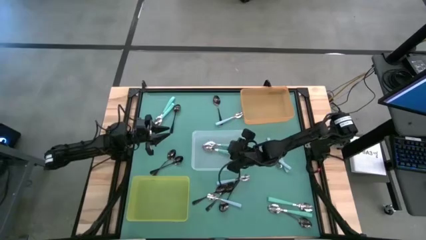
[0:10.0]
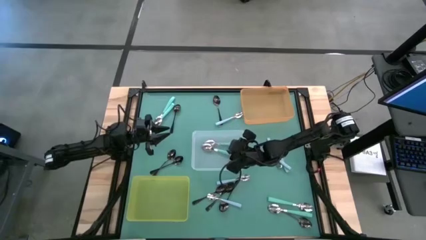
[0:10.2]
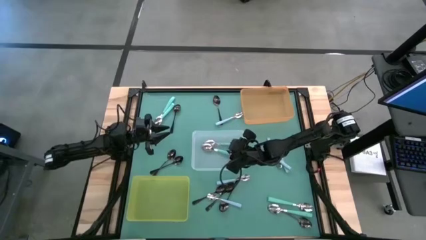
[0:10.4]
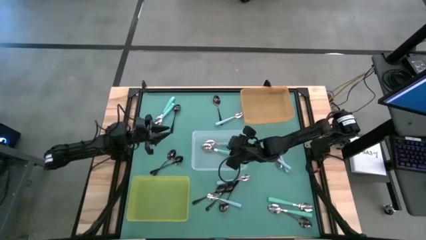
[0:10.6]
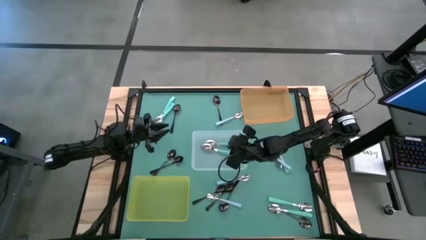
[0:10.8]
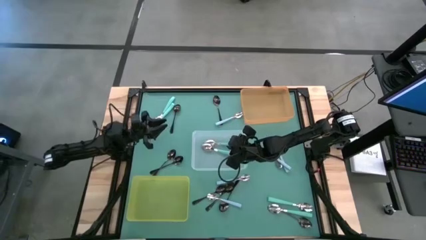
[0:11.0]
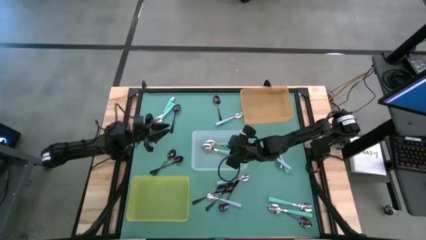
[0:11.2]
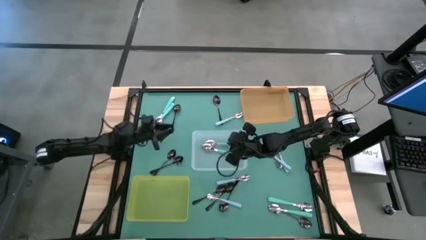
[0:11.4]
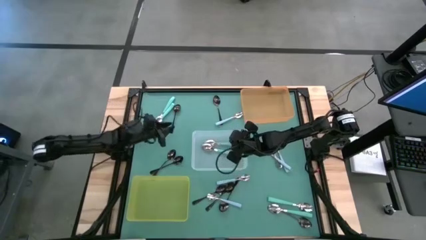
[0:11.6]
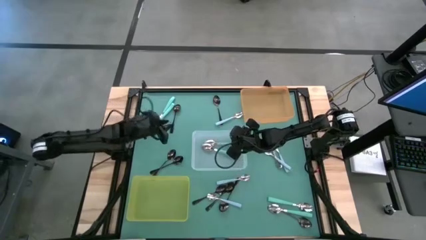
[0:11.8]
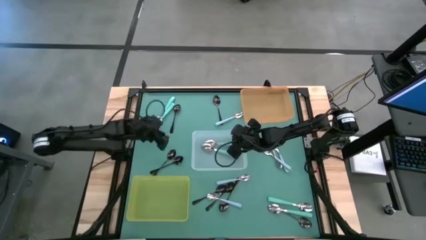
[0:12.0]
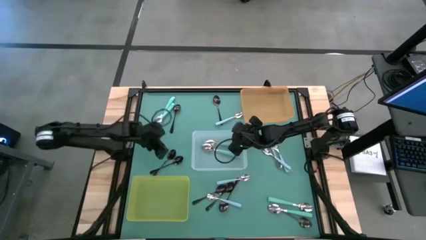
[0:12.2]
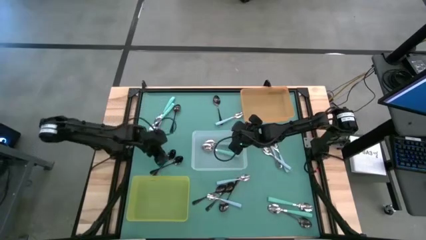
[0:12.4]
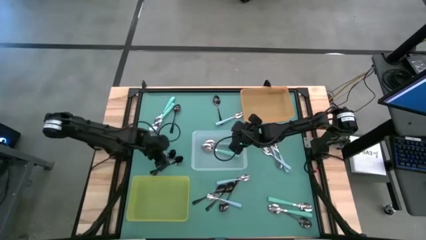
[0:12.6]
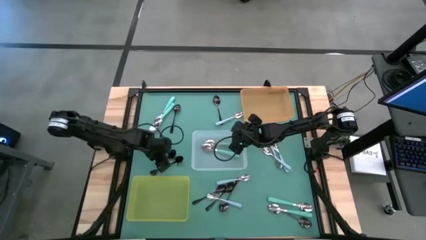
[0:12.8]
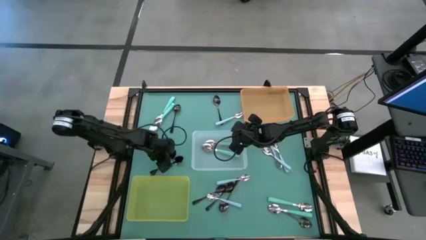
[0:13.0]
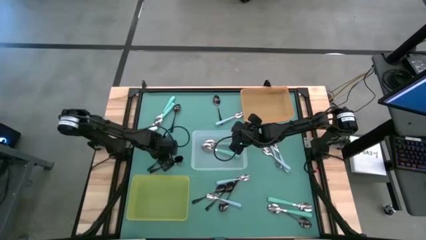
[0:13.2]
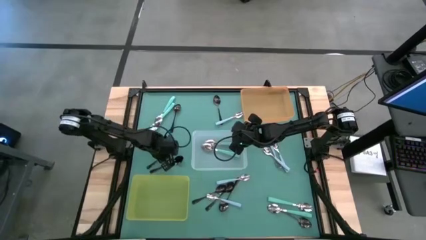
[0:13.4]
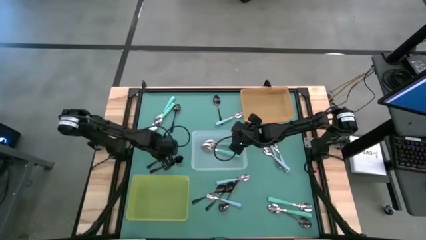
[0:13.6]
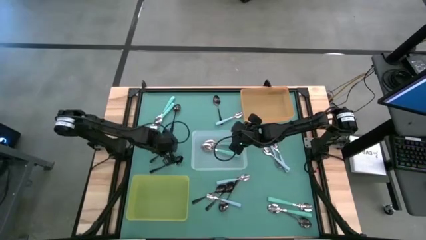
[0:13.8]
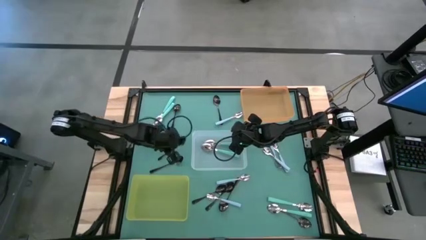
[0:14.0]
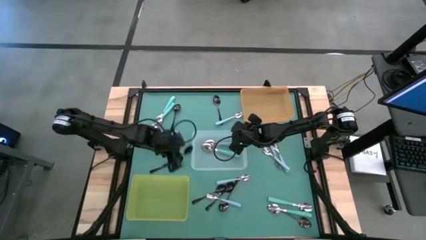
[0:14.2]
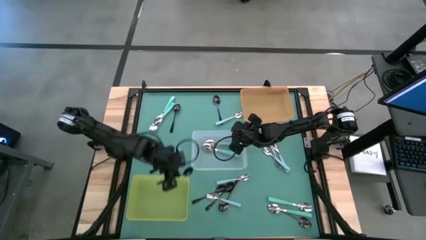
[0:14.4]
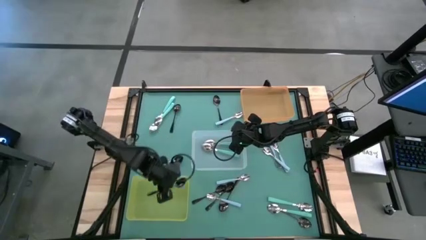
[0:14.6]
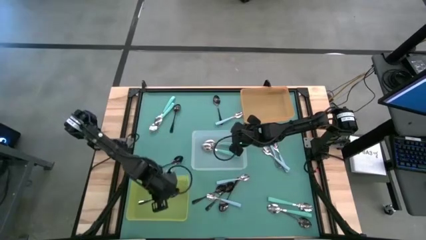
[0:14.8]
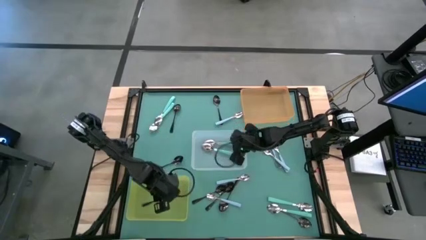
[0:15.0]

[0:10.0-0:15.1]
Task: Sort silverware by color (type)
Put the black spoon into the yellow bin

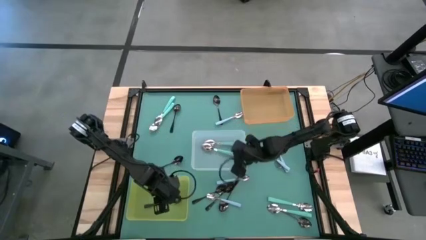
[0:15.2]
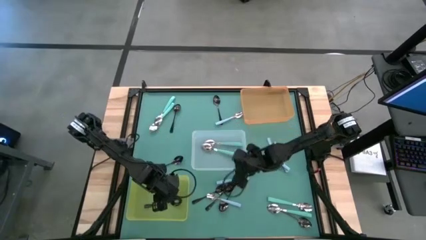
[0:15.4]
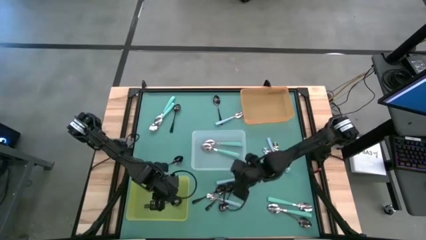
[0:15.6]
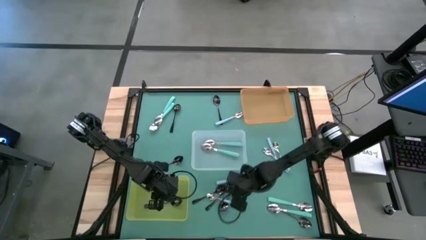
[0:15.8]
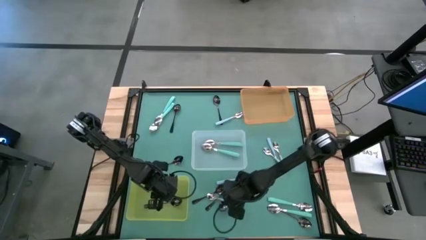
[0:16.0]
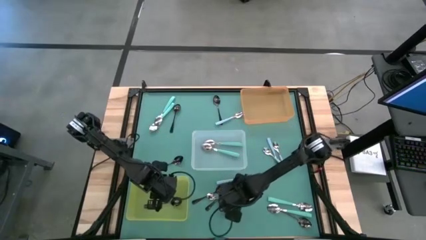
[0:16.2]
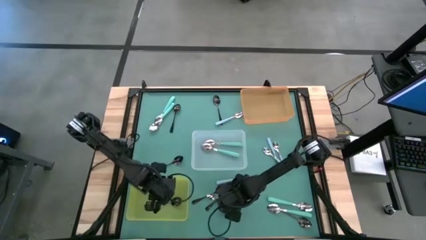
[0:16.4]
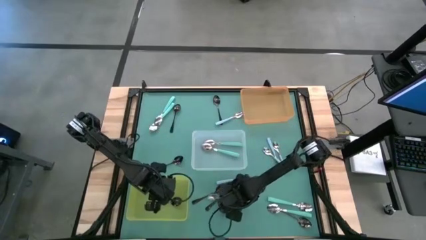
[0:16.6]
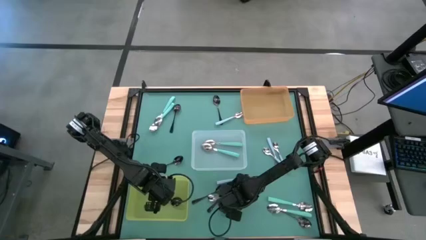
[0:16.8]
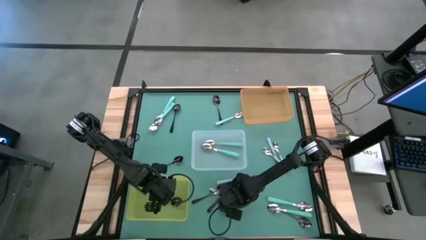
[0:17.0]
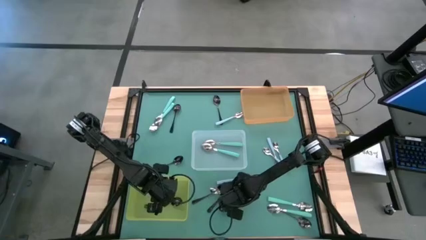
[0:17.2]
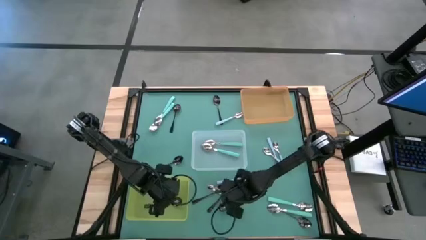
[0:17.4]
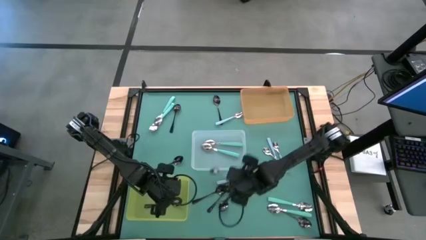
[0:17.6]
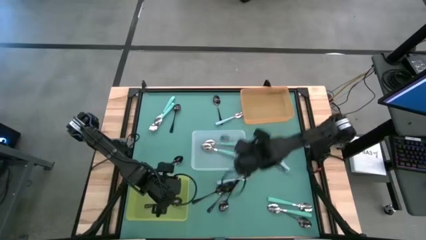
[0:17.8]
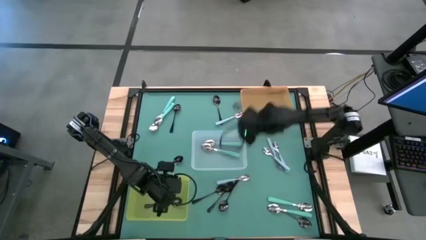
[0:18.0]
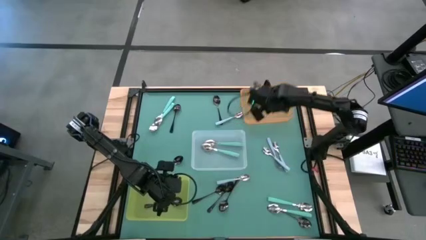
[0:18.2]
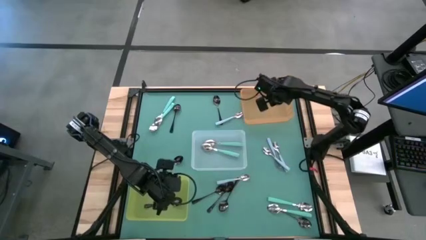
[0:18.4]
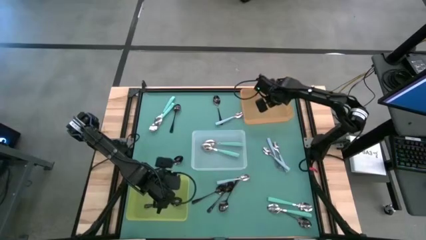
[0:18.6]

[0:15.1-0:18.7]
Put the purple spoon into the orange bin

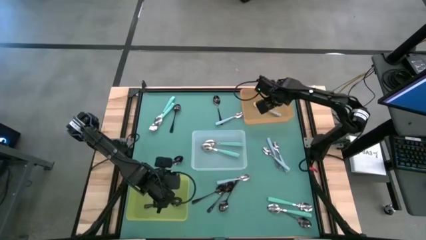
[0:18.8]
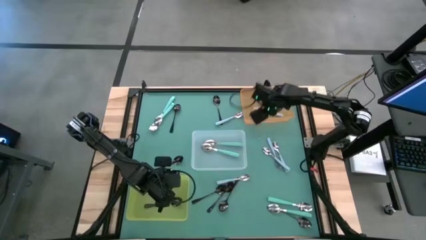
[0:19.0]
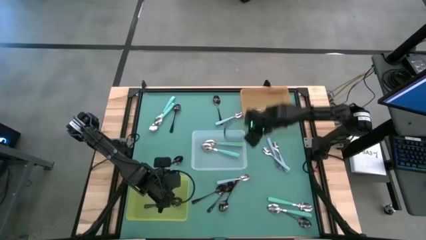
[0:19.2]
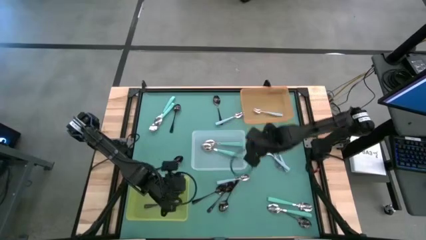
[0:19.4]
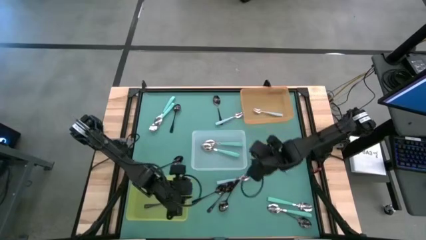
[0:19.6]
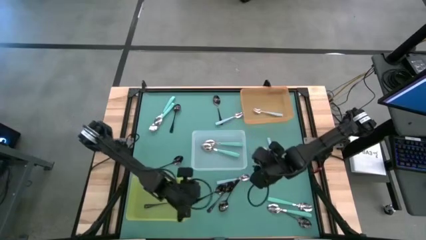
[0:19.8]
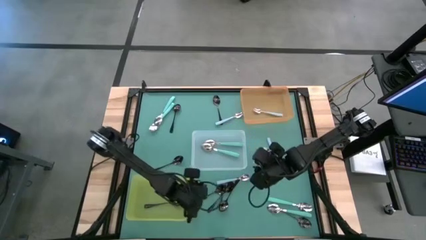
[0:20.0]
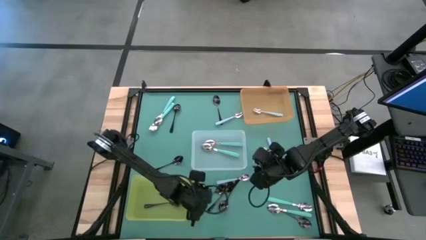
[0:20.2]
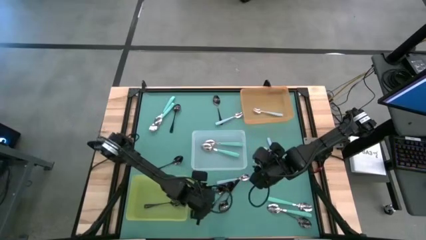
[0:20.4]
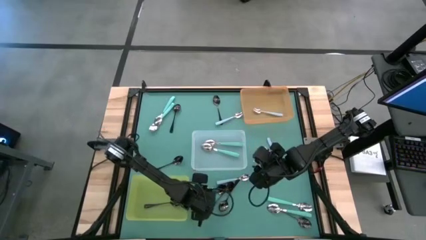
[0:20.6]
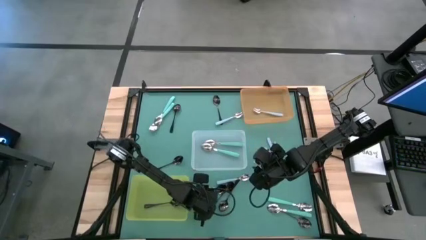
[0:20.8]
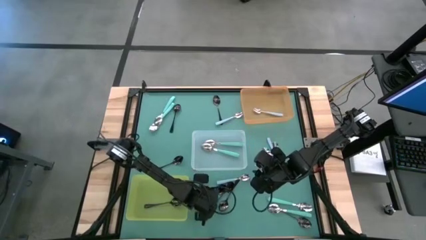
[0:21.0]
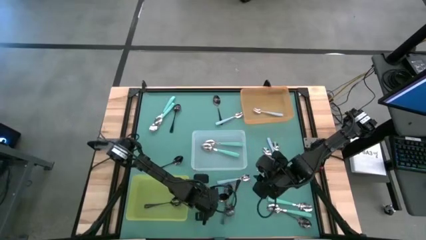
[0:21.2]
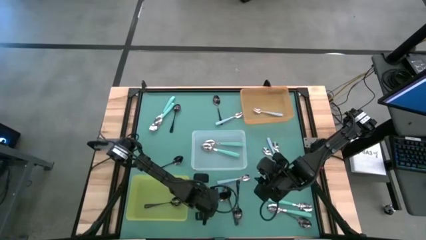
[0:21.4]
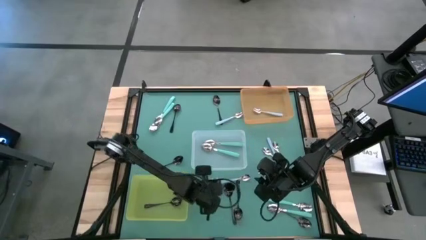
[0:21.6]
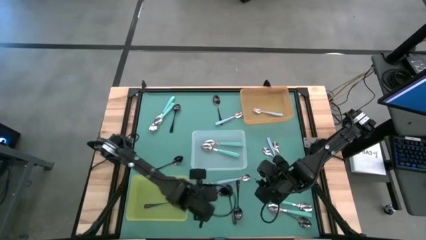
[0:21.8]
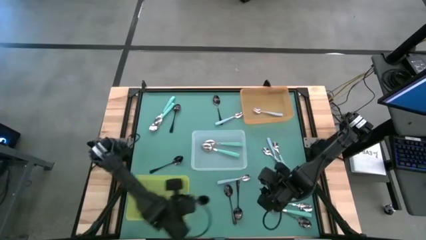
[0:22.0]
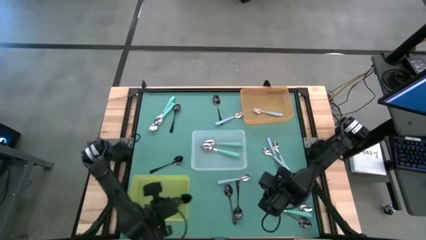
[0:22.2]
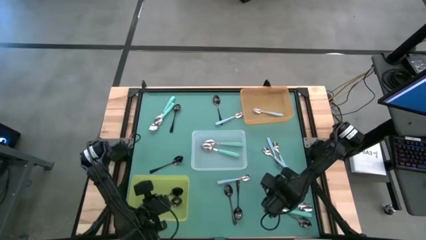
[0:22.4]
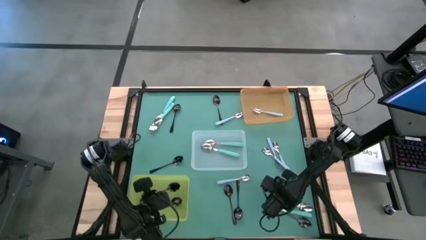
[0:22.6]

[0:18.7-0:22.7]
Put the black spoon into the yellow bin

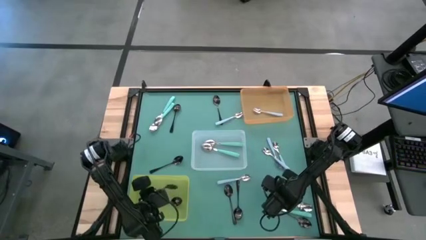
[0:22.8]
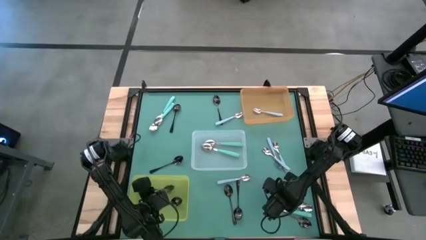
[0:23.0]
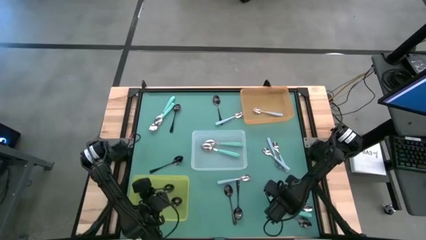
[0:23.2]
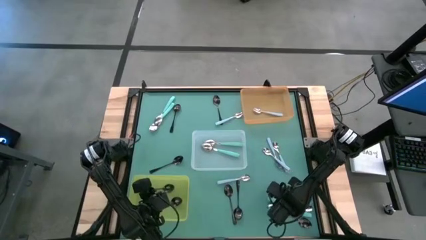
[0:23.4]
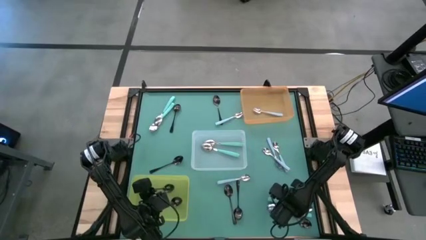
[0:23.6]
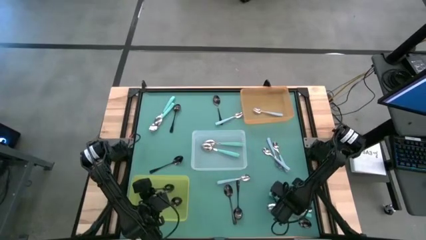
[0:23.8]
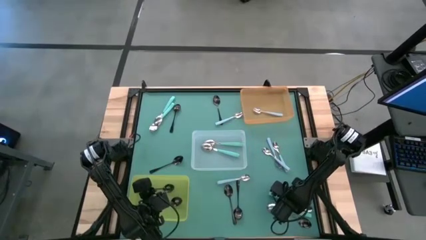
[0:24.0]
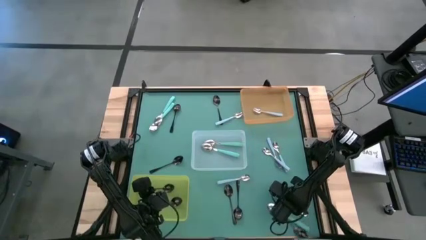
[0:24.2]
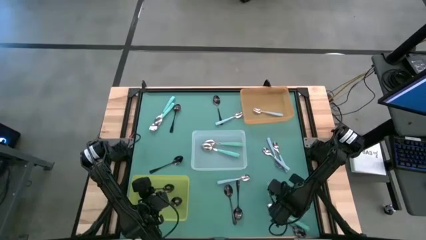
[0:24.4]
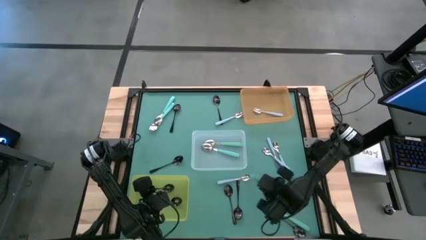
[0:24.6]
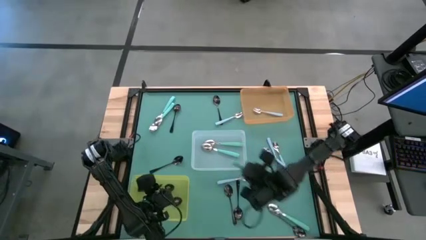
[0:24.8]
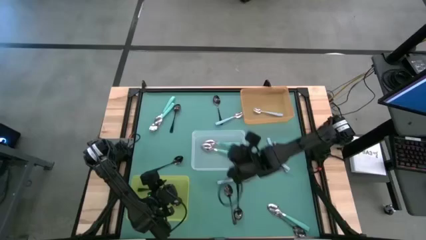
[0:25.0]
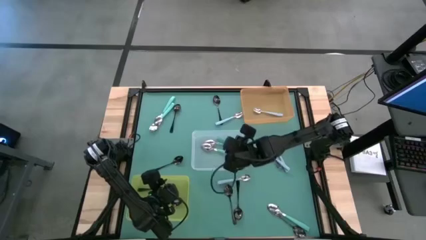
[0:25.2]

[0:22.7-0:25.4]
Put the green spoon into the transparent bin

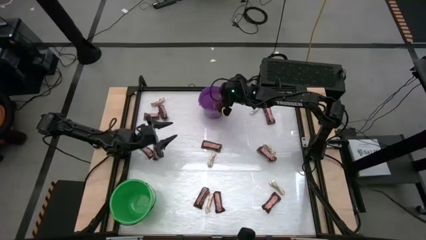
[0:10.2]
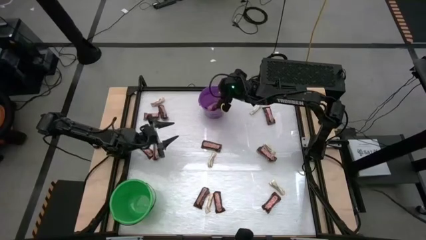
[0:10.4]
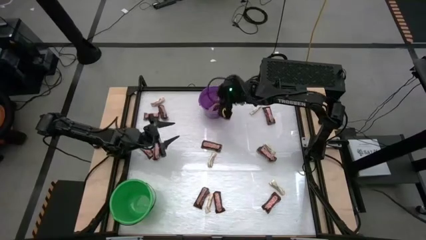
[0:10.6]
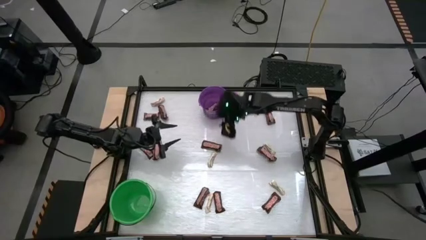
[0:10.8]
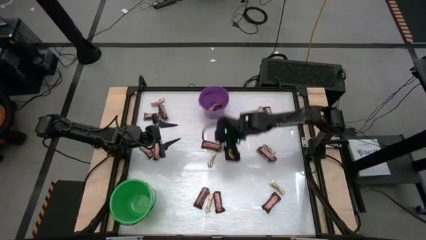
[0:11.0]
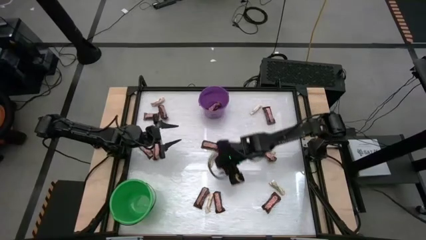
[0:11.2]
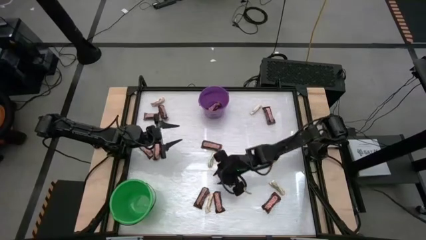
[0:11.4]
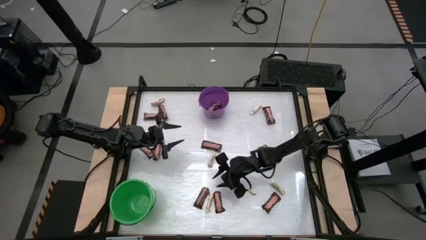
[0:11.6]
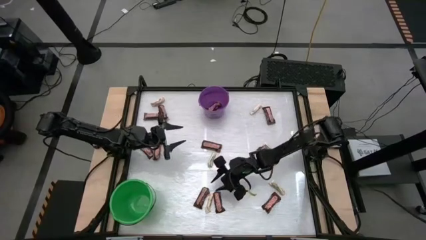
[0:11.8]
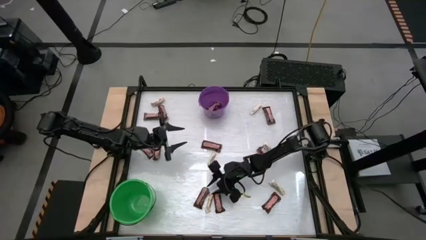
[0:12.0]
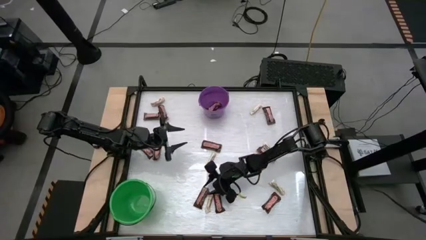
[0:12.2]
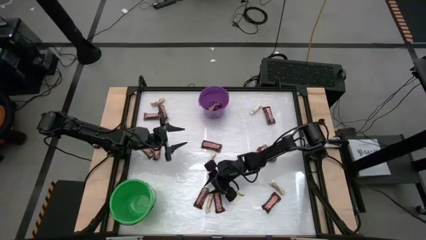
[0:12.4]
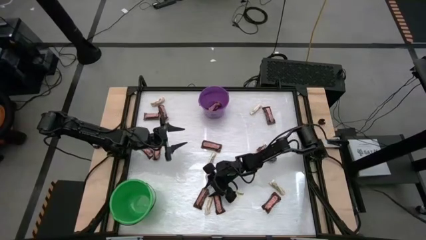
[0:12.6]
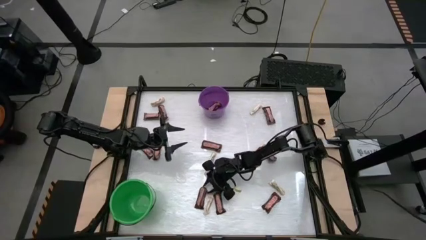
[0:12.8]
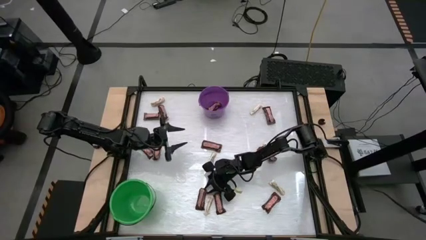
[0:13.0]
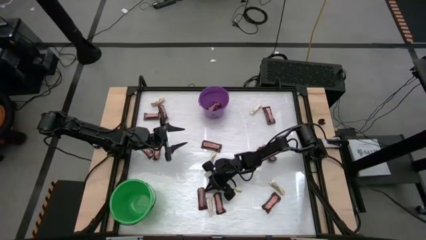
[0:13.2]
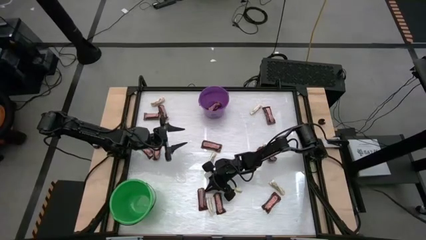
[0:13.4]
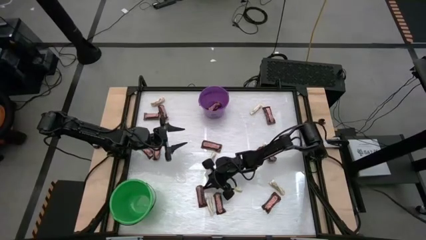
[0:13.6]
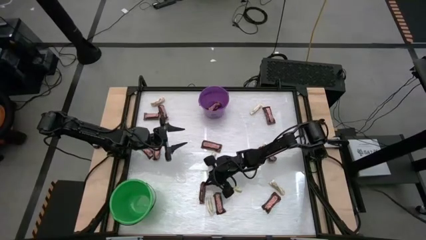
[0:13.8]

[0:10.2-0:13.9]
Task: Sort candy by brand, put in halloween buckets
Put the brown chocolate into the purple bucket
